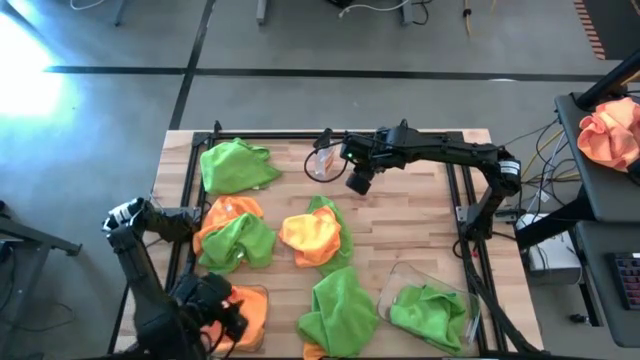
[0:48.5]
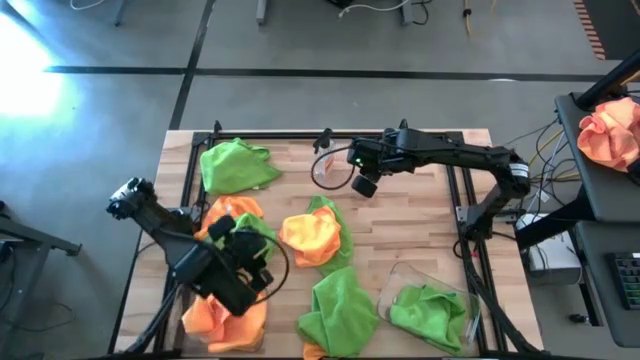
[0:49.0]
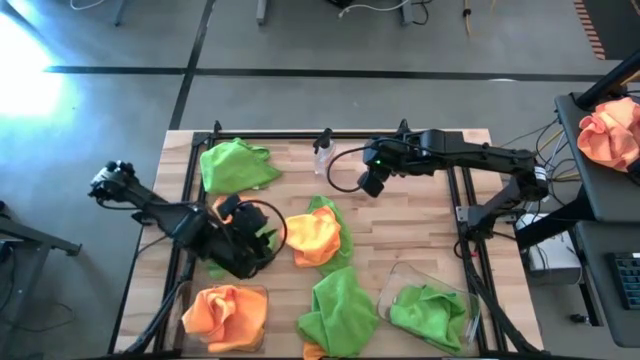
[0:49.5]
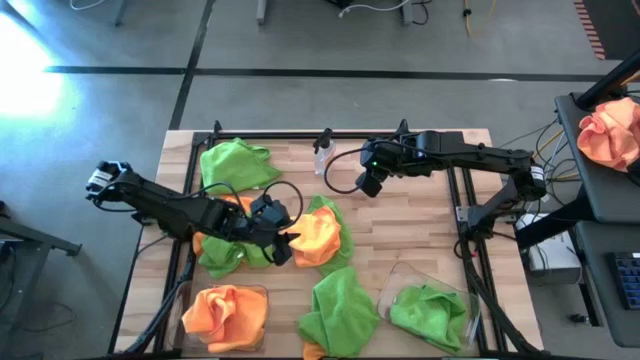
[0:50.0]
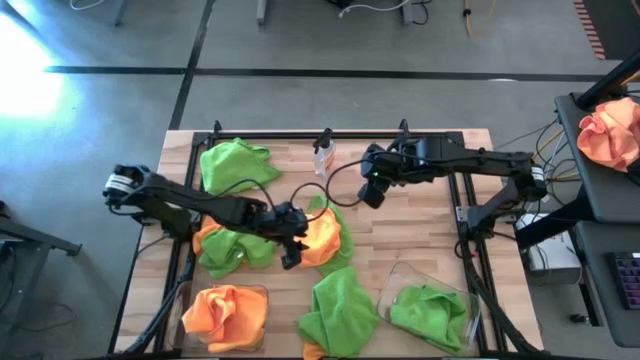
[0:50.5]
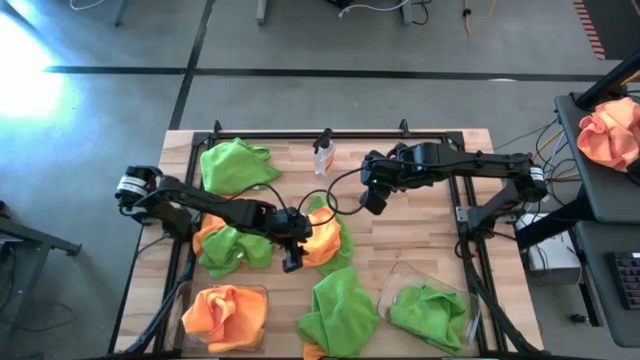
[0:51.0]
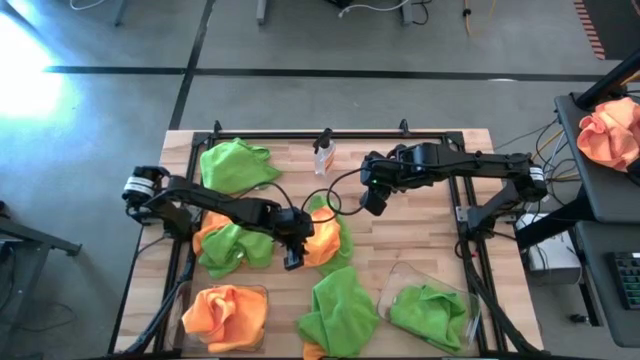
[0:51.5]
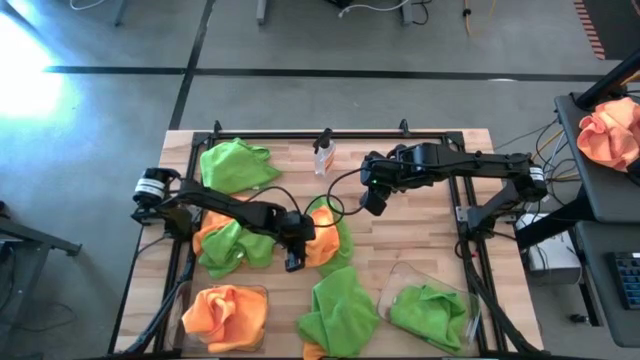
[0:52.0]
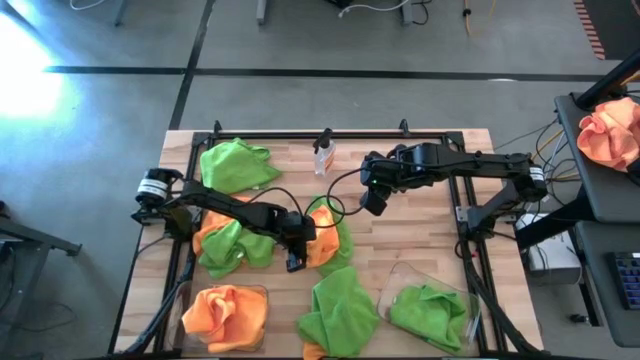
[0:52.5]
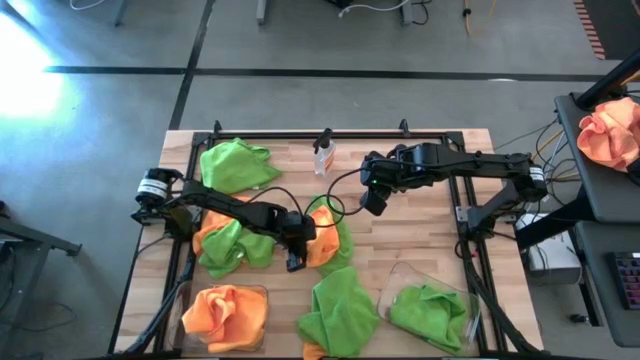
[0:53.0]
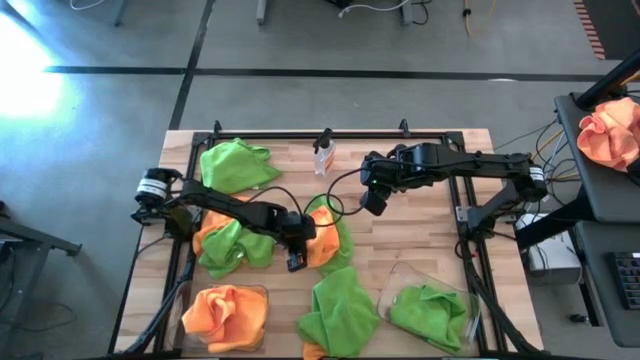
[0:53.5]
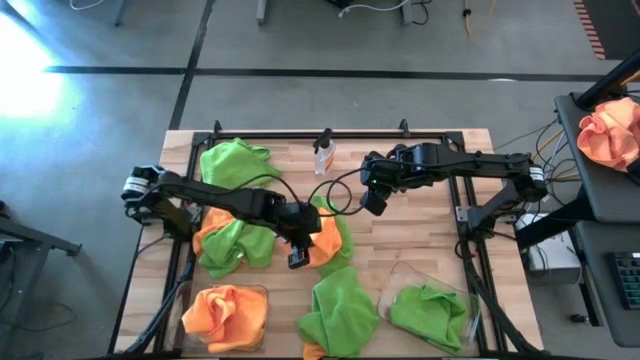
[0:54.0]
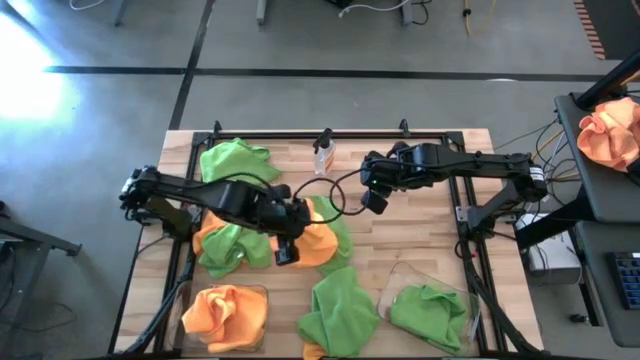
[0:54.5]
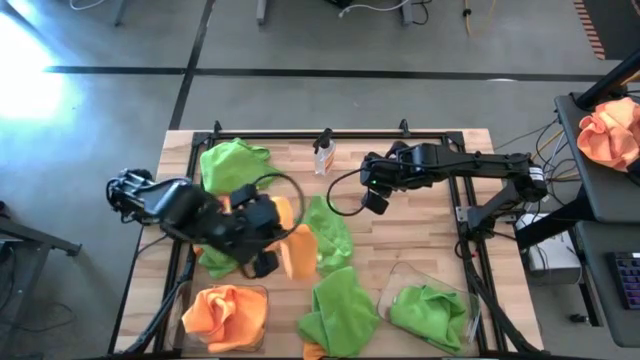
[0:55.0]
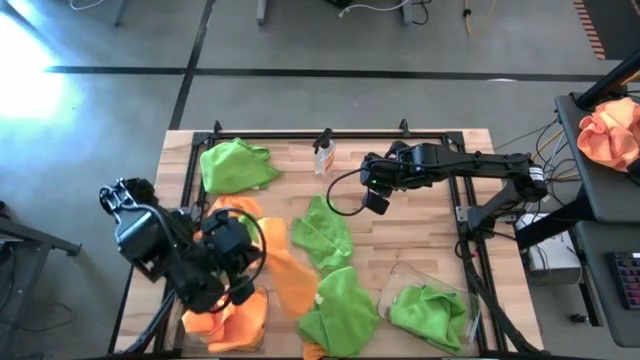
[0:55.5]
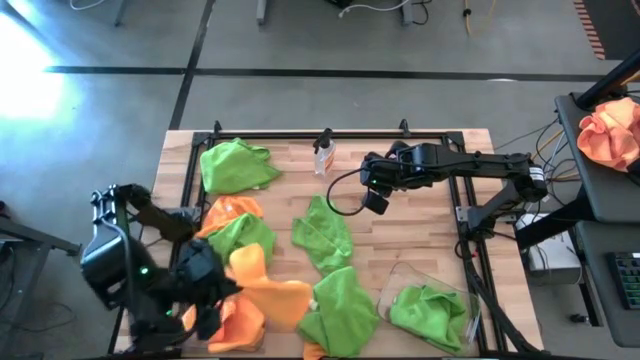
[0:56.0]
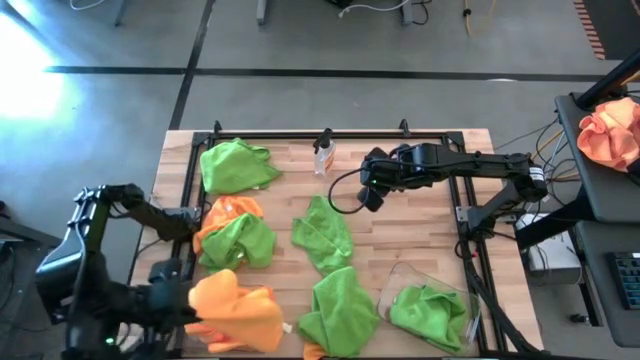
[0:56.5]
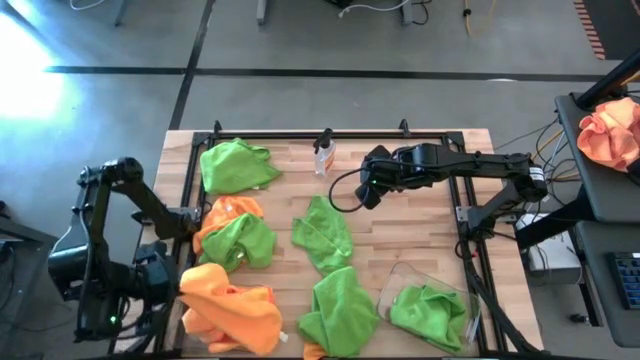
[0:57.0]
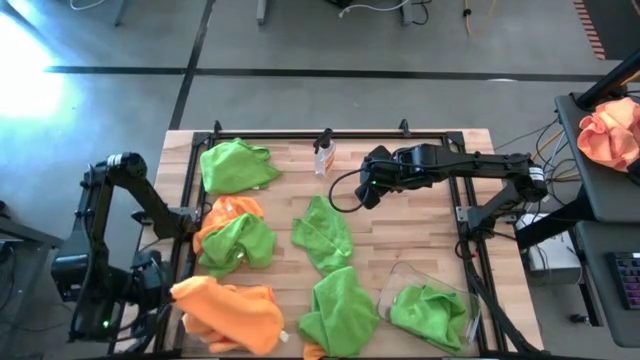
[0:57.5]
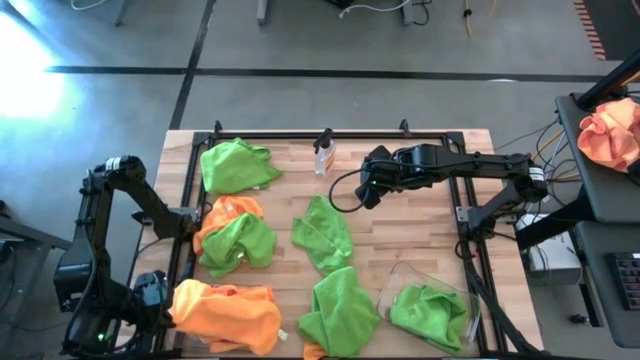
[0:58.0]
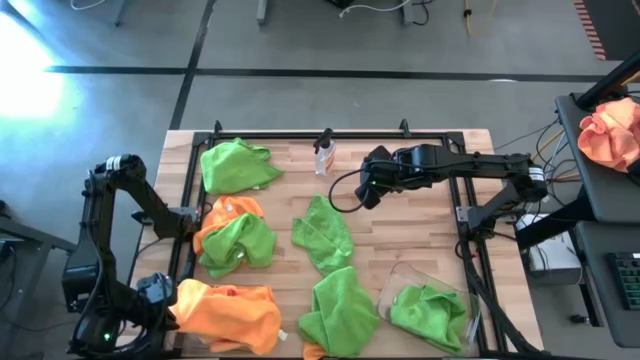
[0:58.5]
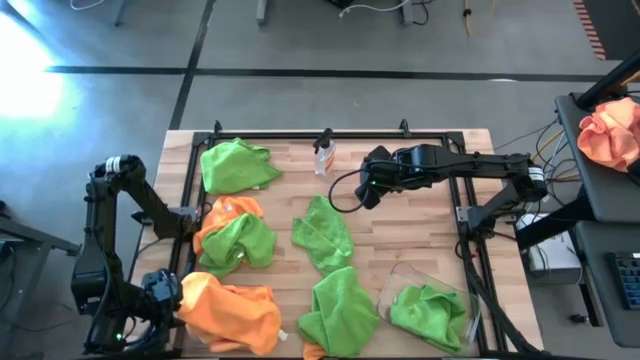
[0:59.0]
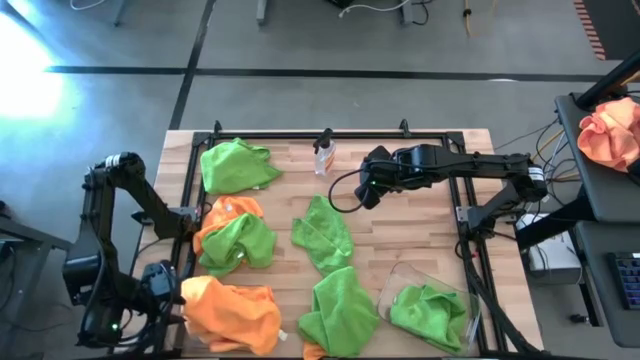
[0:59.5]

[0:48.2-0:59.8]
Task: Sort microfiber towel by color & place in baskets
Put the orange microfiber cloth into the left transparent bin

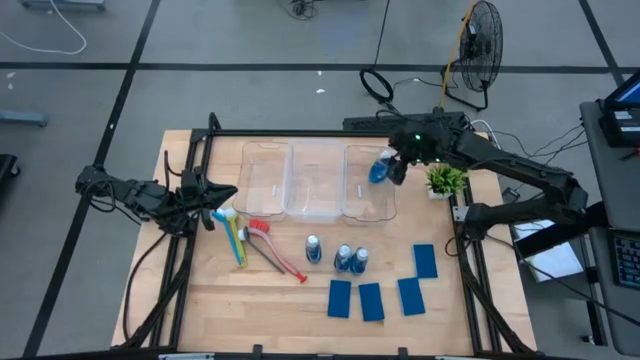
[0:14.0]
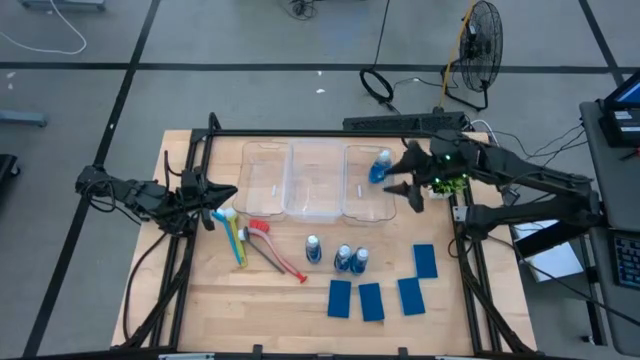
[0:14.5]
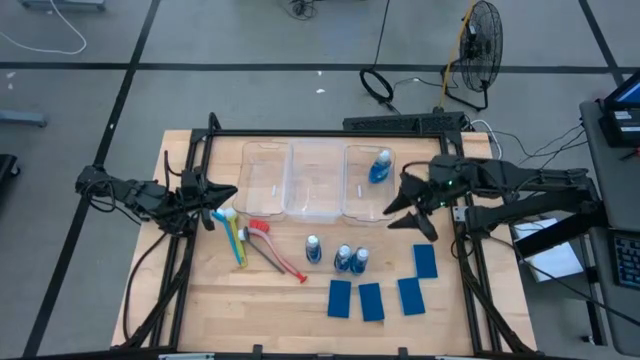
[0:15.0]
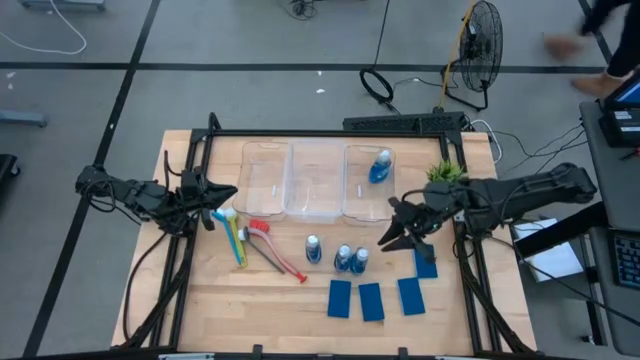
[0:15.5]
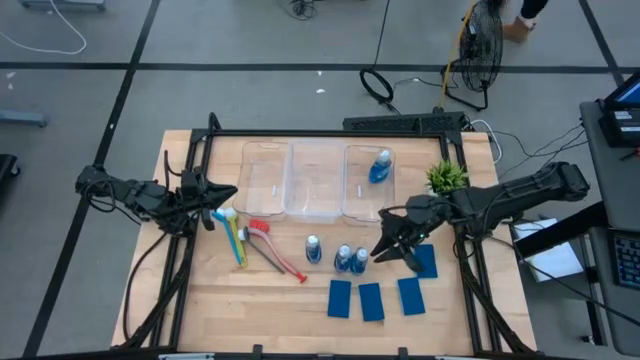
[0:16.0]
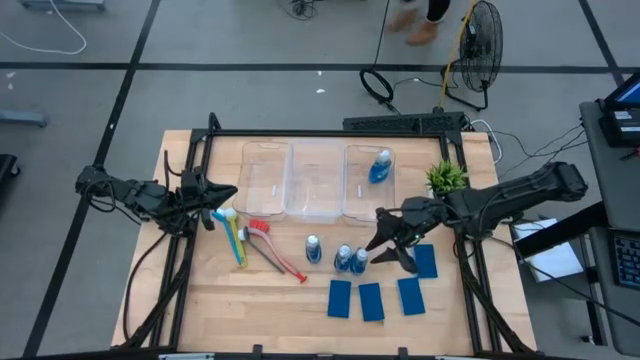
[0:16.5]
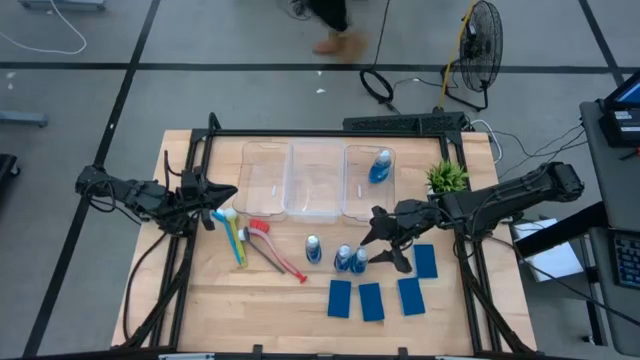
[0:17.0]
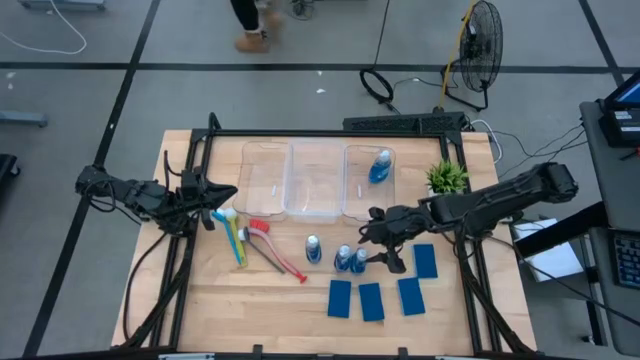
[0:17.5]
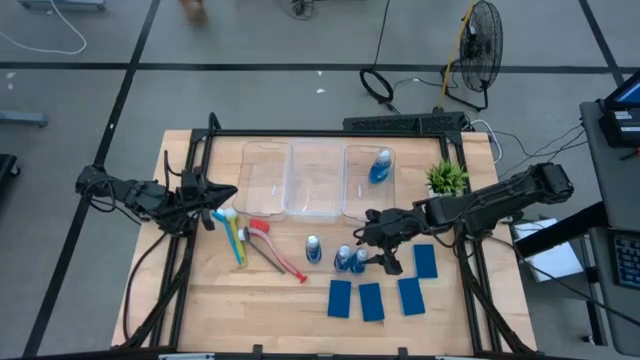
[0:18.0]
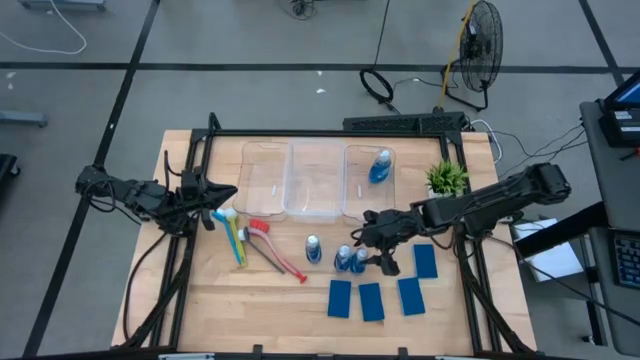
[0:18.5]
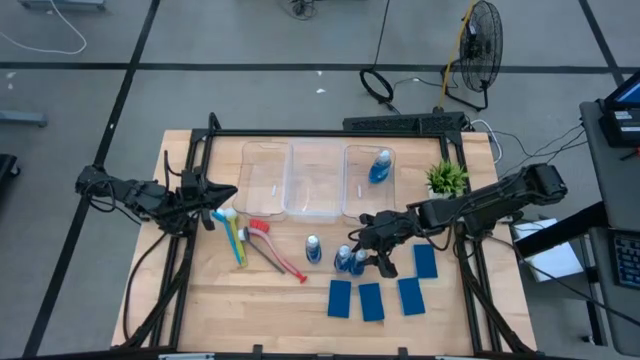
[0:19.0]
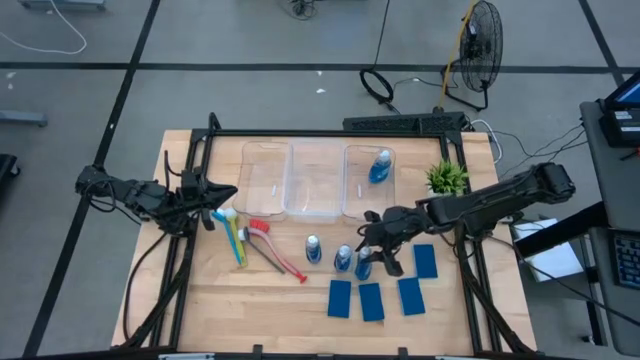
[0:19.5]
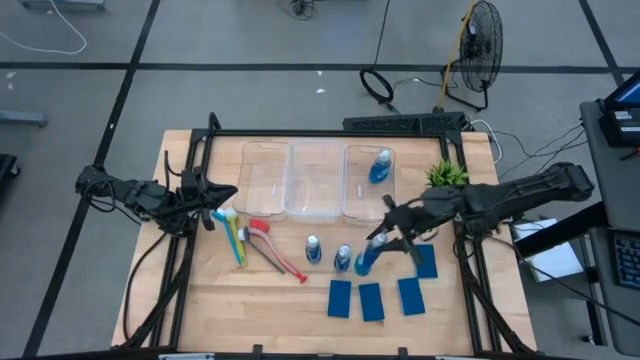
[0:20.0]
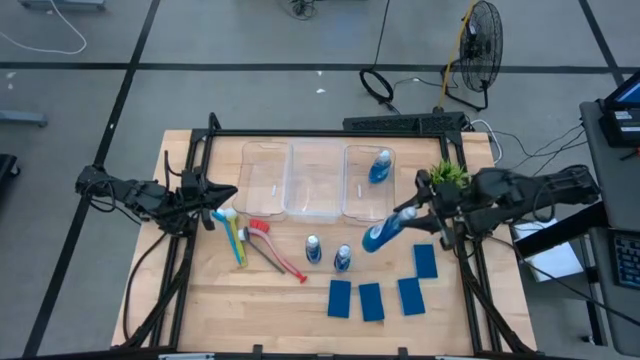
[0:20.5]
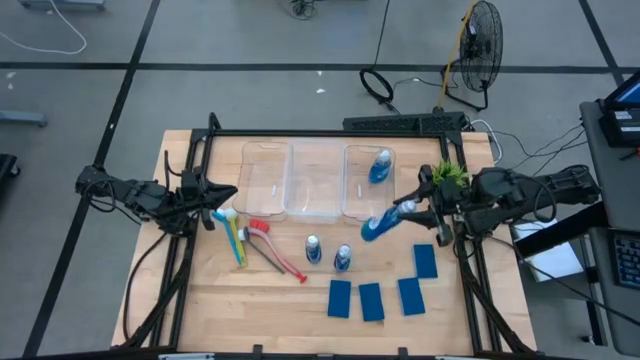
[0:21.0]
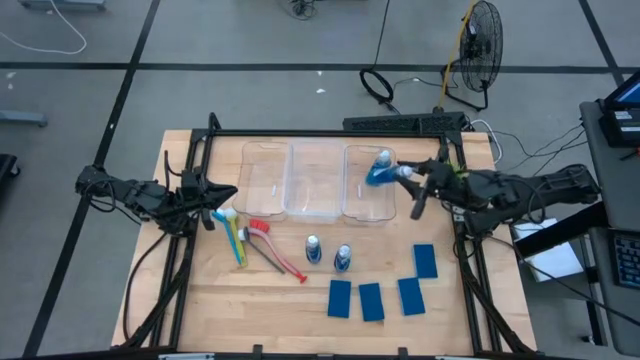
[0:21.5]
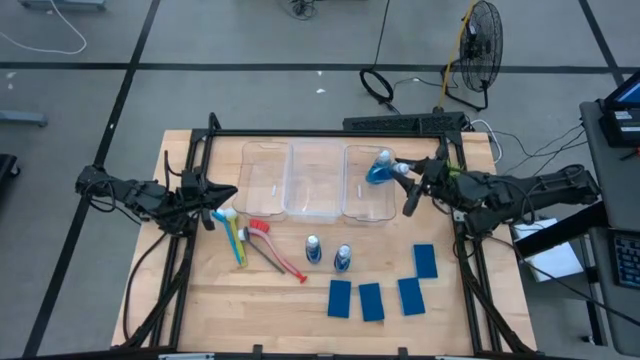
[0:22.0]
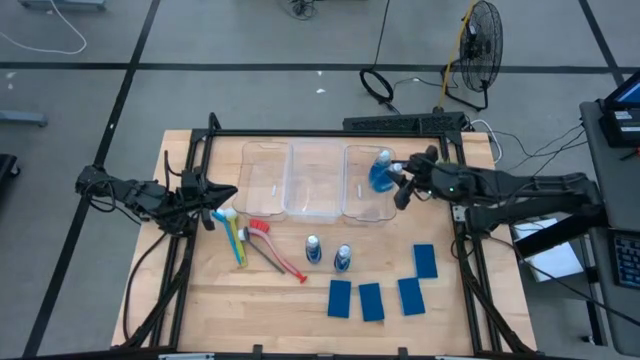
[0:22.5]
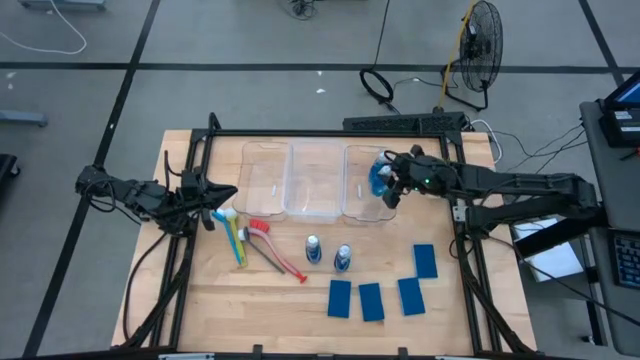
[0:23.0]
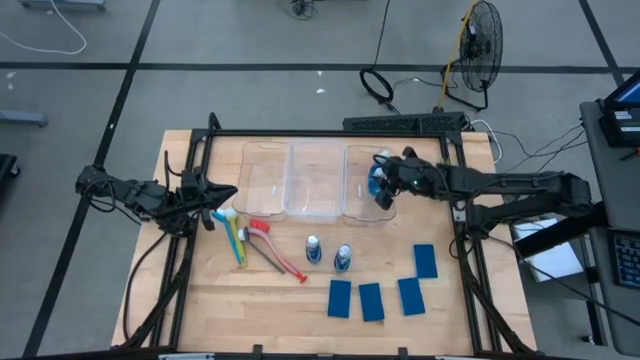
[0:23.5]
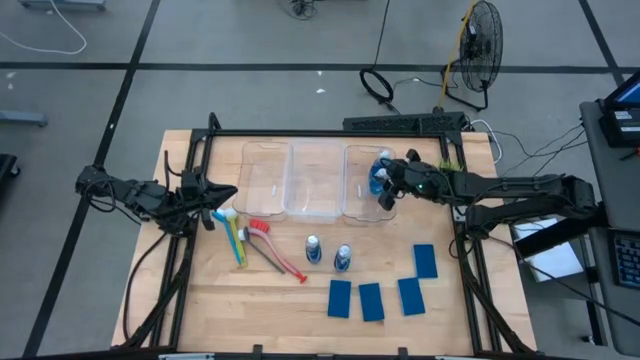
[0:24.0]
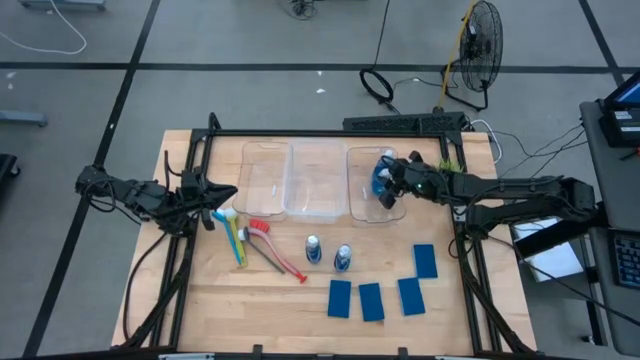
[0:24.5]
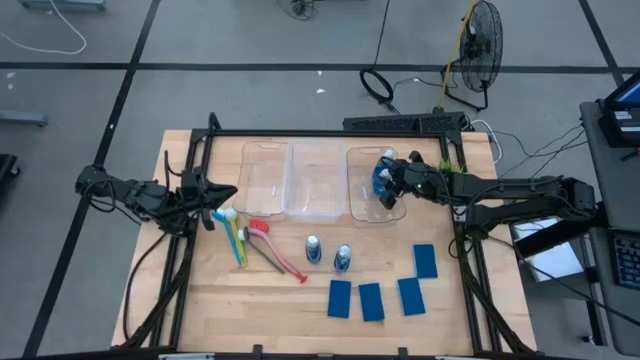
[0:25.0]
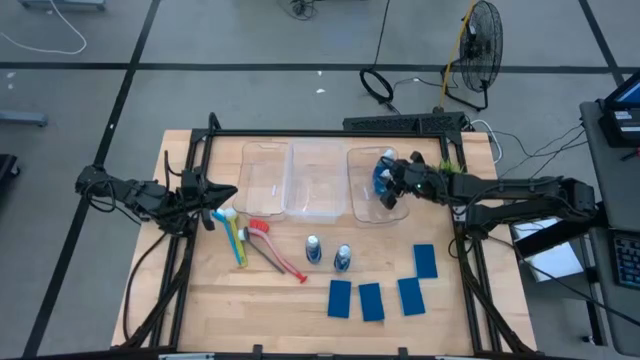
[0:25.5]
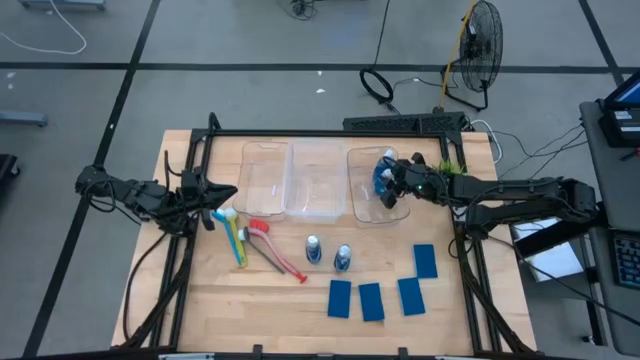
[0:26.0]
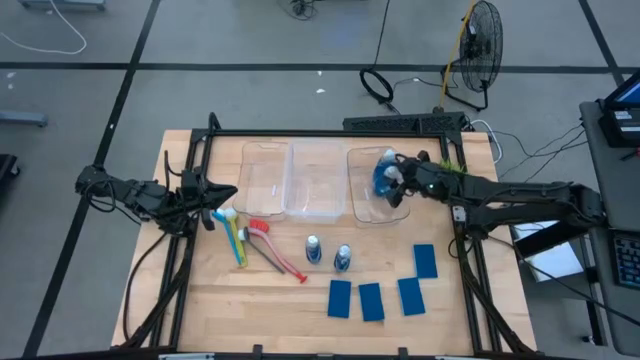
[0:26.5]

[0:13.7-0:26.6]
Task: Pick & Place Kitchen Sink Supplies
Put the blue dishwashing liquid bottle into the right transparent bin
